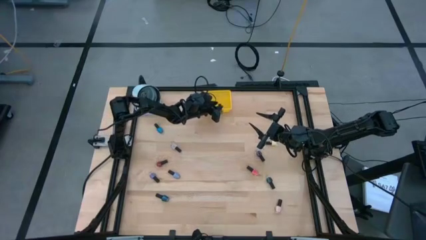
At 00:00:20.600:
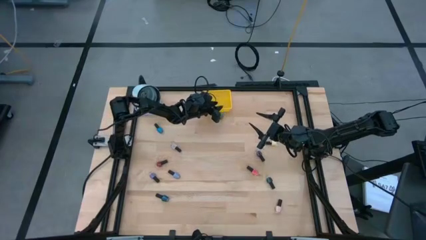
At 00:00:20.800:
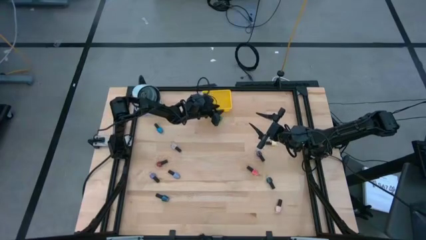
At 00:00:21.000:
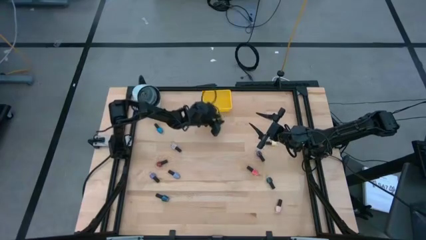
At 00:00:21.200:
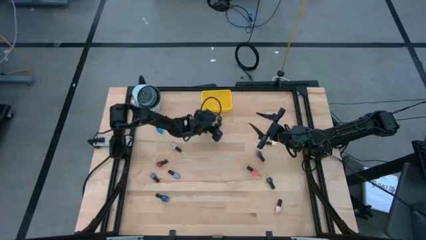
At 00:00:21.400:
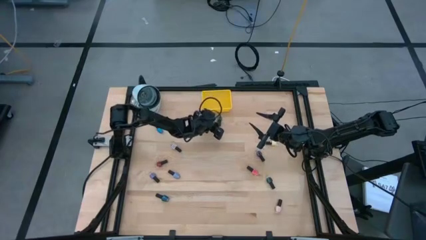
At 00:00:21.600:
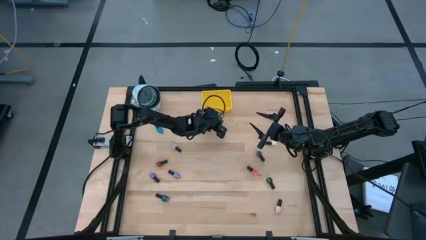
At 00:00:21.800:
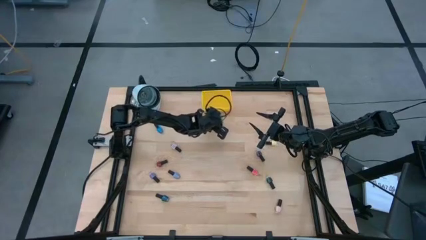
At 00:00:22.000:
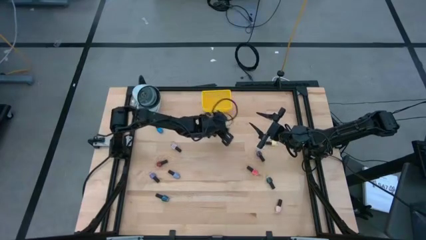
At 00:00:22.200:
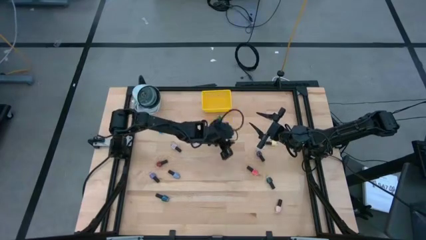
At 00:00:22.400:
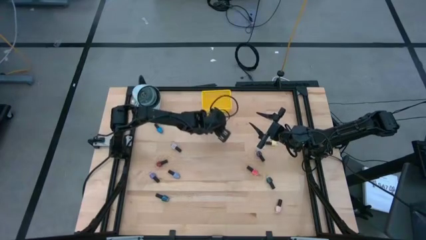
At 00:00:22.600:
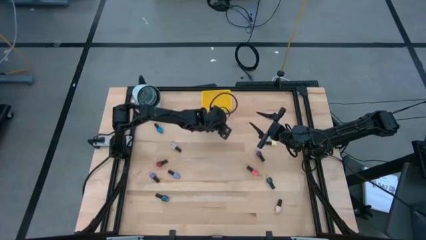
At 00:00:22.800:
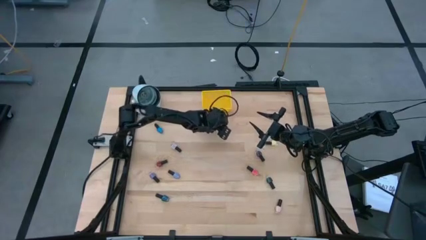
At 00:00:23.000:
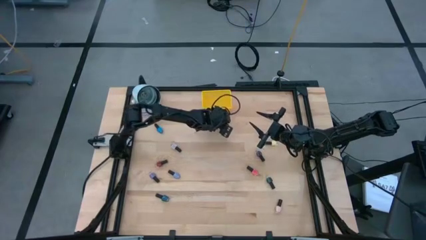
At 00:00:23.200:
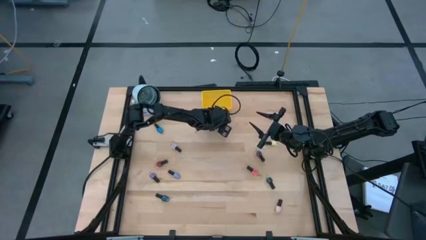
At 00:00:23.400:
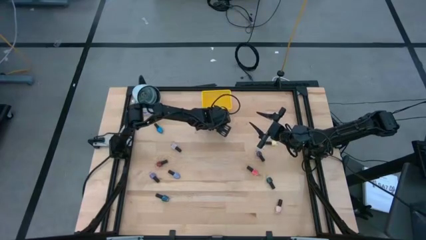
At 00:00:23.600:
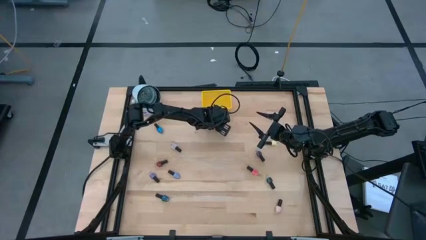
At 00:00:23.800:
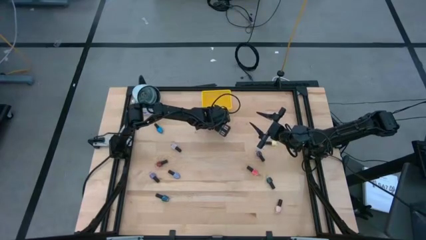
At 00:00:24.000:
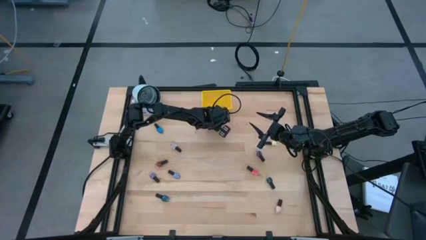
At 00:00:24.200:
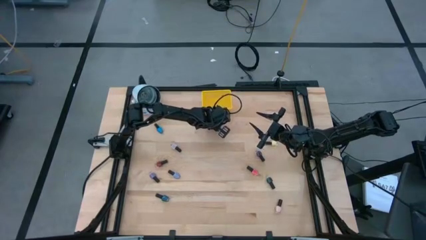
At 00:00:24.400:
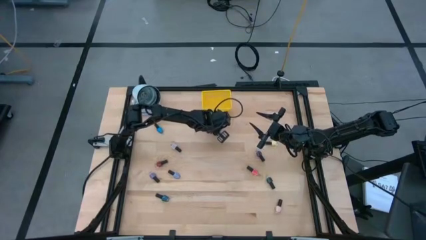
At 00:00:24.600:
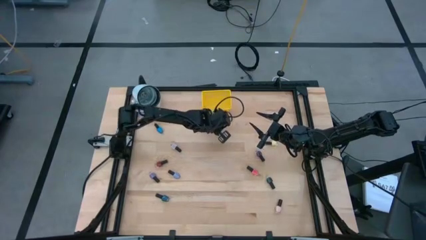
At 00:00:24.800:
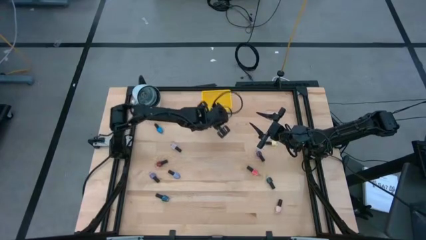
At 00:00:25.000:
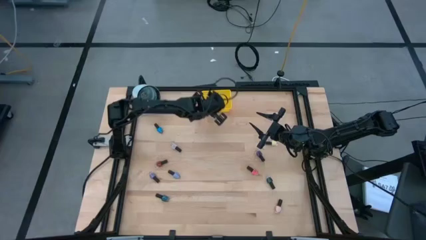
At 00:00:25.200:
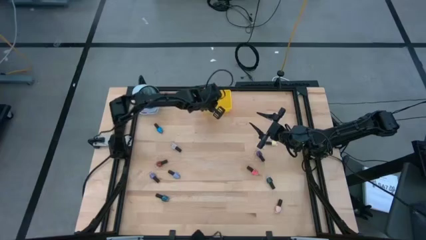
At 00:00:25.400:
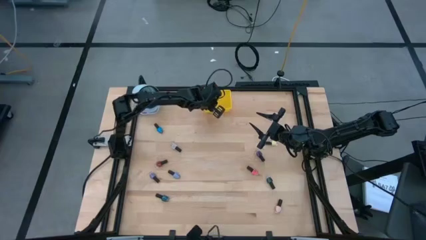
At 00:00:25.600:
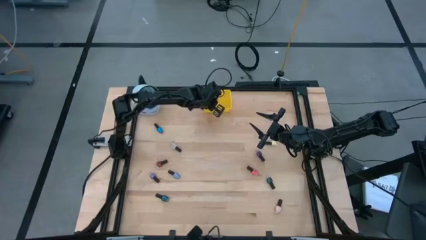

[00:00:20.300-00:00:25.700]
Task: Pick & Place Nail Polish
Put the green nail polish bottle into the yellow bin

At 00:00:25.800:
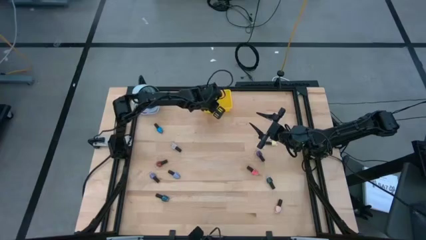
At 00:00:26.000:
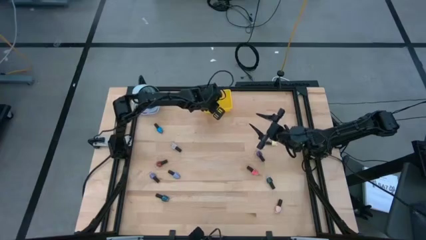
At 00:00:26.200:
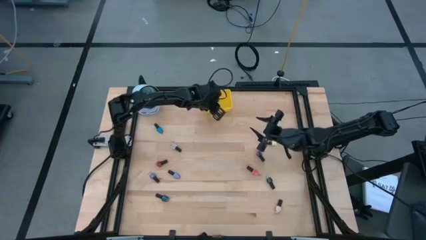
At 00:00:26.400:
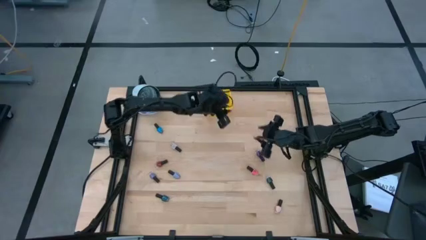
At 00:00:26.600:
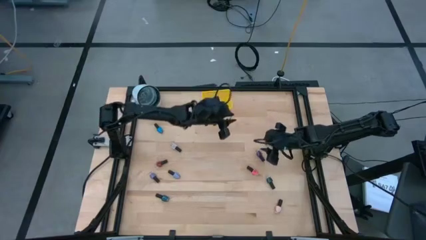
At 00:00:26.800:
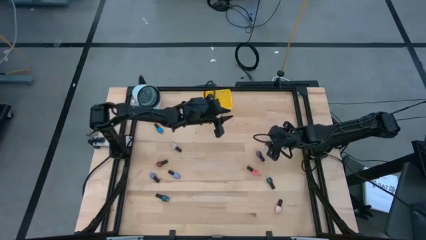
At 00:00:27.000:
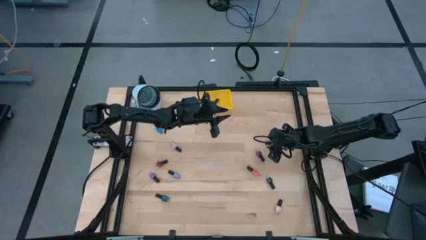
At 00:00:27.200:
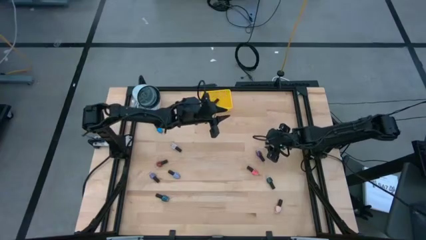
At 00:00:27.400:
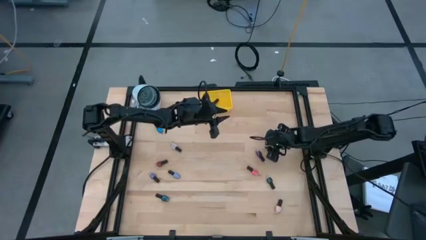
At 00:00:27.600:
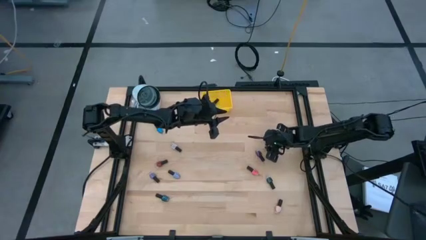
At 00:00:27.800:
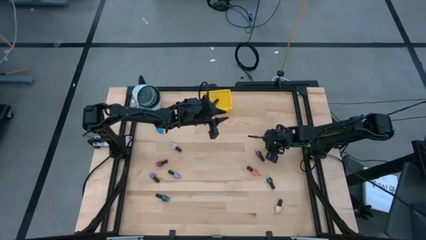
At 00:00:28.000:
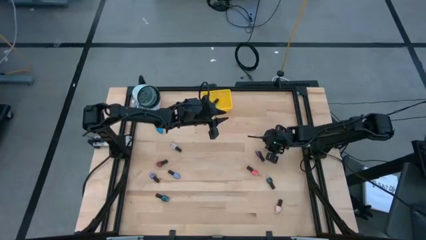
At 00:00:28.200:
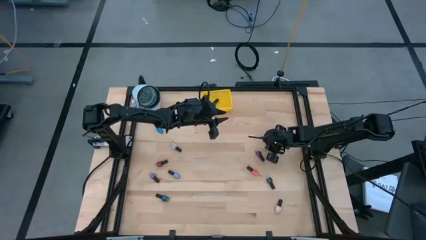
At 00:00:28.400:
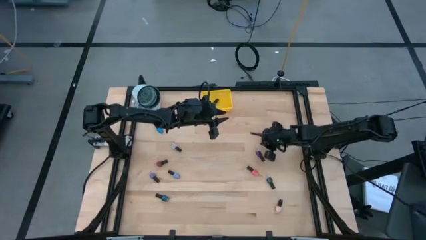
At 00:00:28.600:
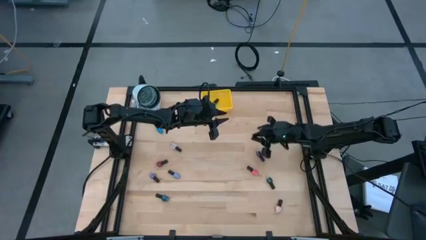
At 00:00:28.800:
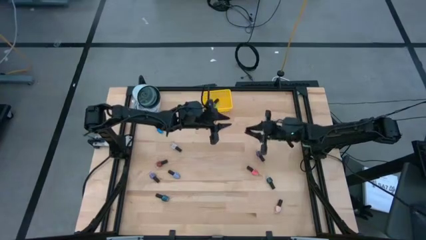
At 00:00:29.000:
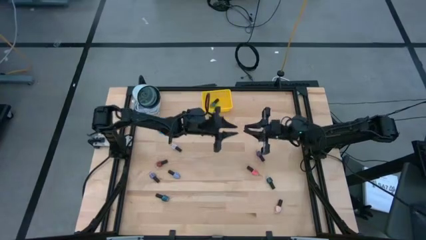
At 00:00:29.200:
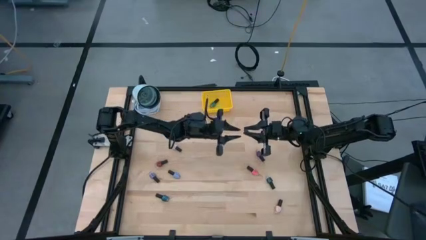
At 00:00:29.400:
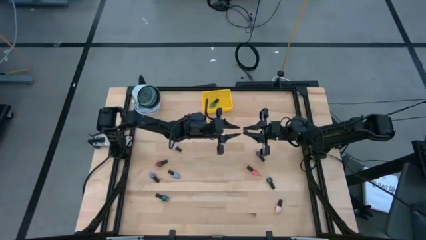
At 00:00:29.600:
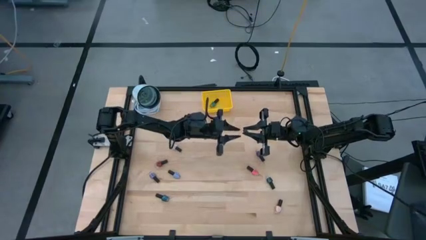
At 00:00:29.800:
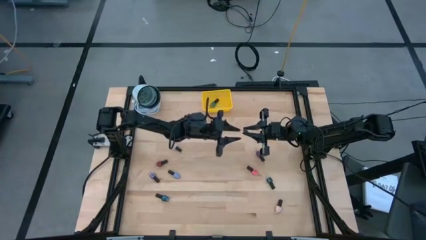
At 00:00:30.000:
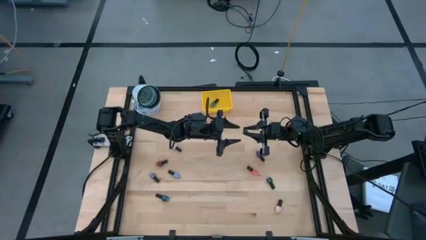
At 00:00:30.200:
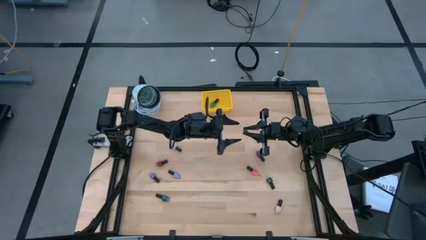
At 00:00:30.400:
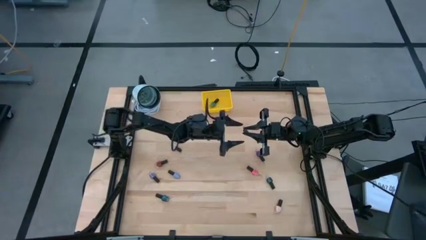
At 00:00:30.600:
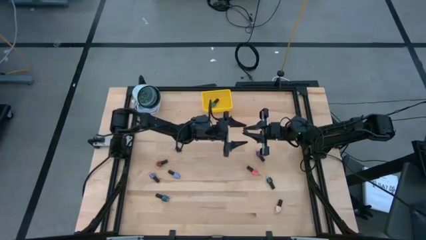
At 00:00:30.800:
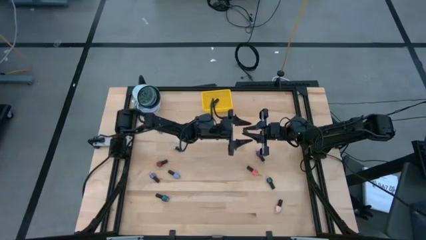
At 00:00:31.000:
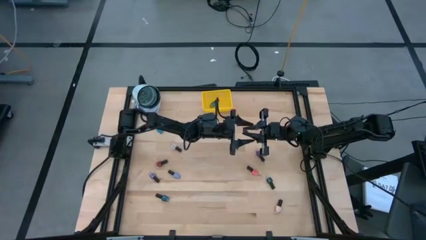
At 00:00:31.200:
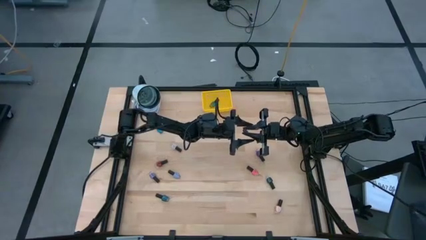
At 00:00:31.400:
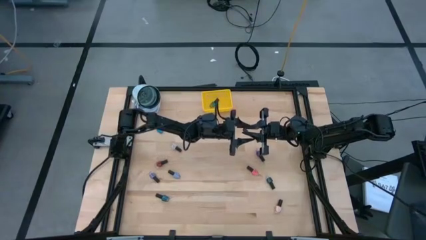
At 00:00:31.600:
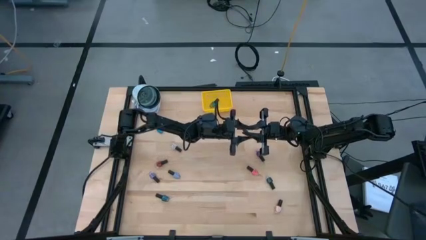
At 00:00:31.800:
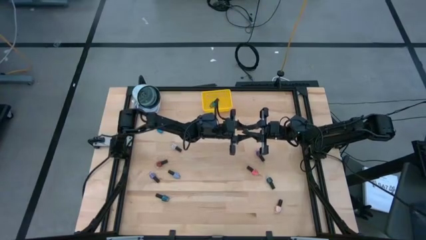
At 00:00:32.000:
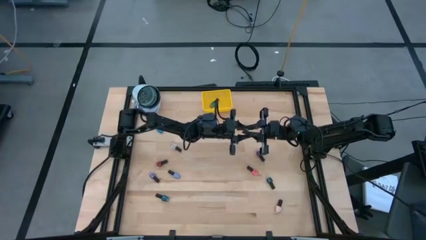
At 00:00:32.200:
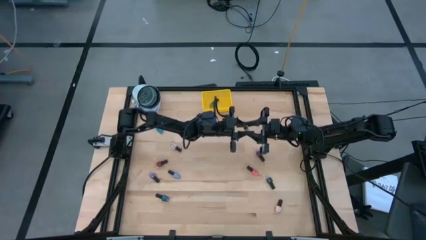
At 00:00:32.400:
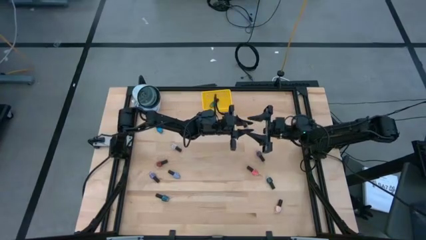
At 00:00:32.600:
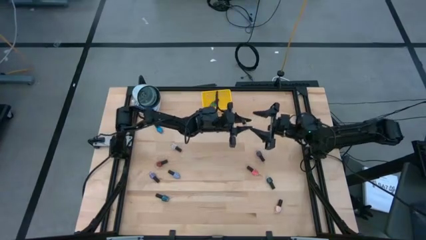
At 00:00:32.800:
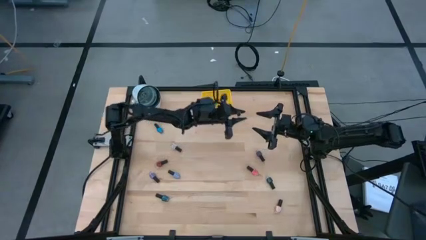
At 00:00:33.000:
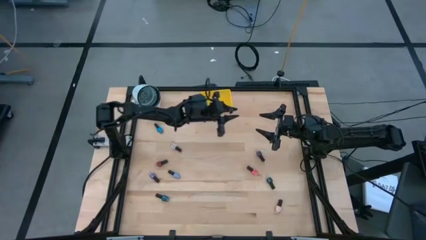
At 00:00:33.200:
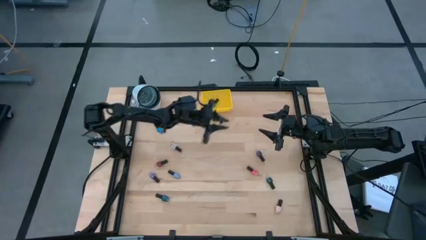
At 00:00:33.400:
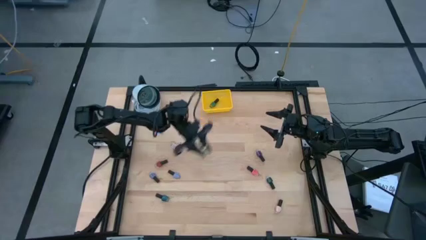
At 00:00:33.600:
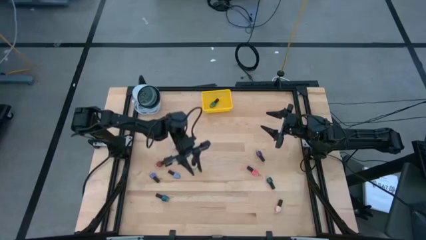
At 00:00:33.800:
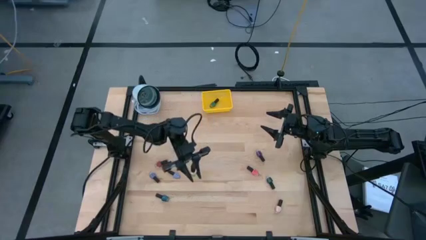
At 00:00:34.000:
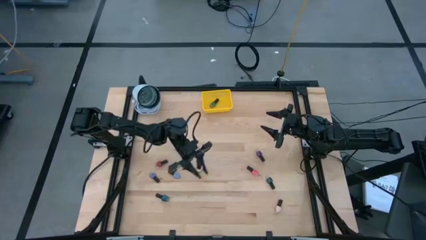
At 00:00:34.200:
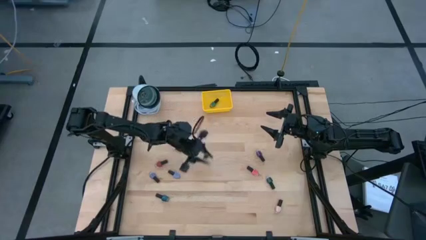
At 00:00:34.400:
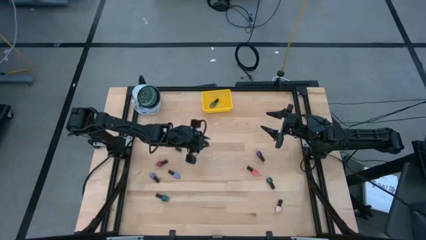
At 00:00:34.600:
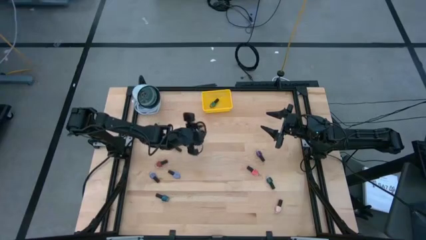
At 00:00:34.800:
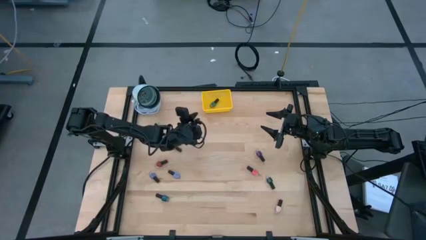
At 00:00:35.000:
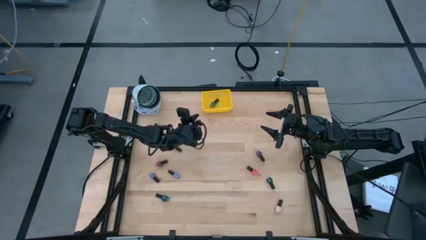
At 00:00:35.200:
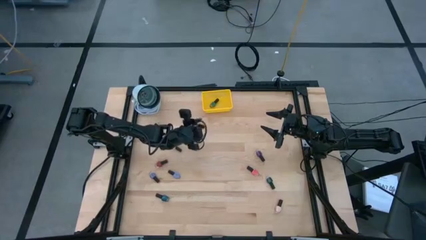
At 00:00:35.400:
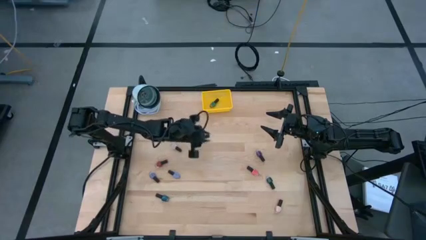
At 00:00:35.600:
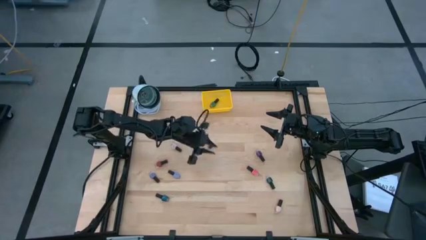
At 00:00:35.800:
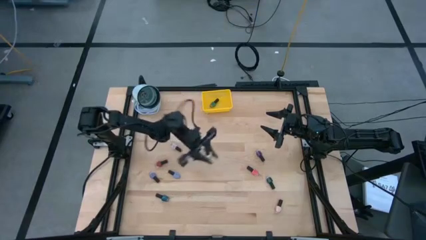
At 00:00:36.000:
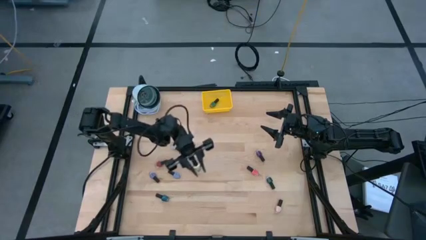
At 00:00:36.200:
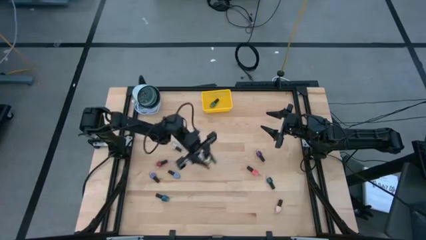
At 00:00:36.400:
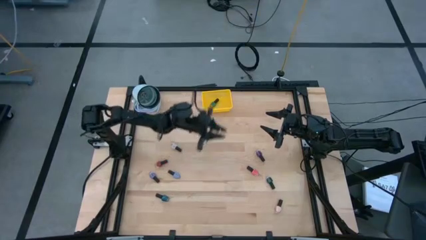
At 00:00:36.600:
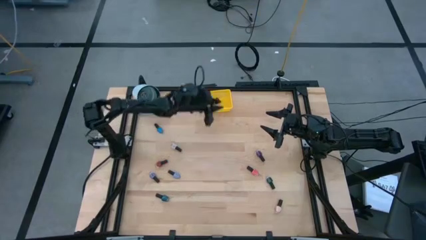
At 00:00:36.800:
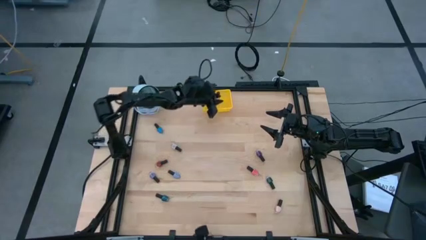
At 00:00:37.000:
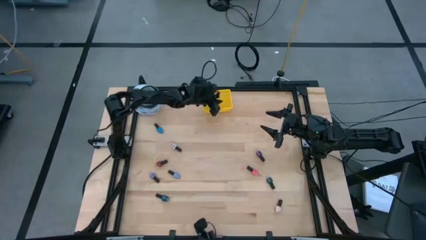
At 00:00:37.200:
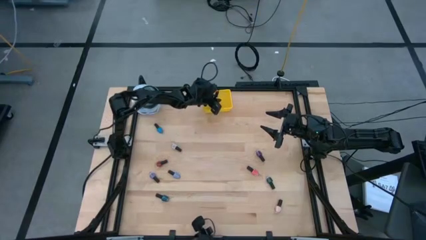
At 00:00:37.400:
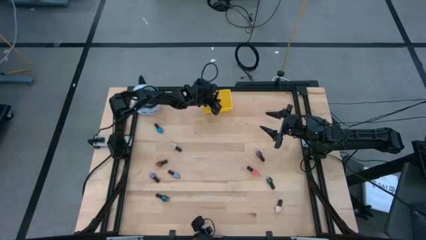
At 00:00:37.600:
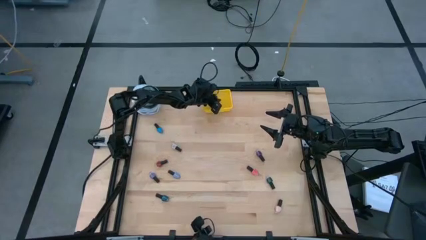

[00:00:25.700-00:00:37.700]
Put the yellow nail polish bottle into the yellow bin
